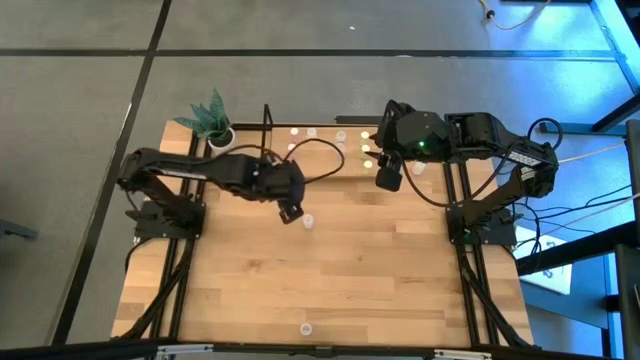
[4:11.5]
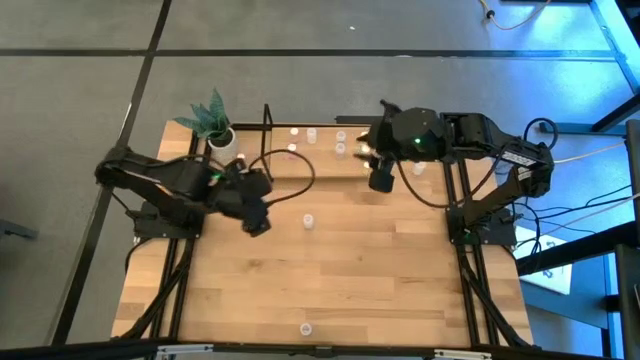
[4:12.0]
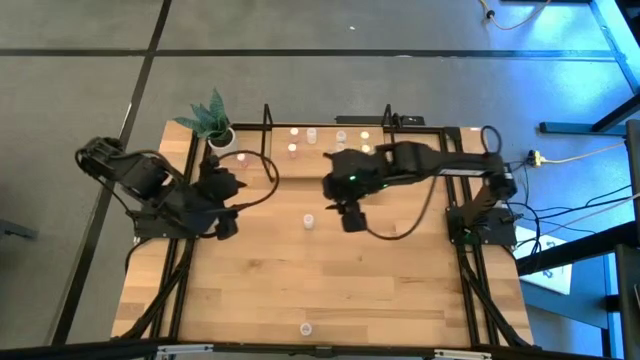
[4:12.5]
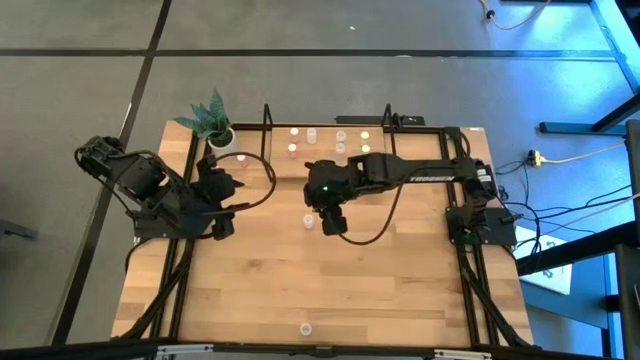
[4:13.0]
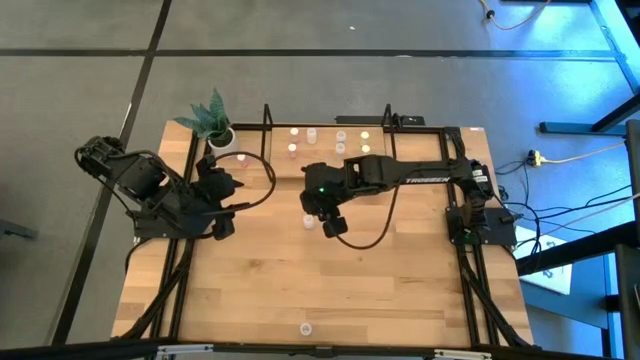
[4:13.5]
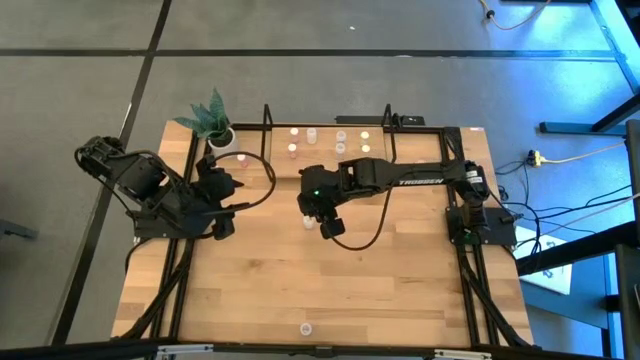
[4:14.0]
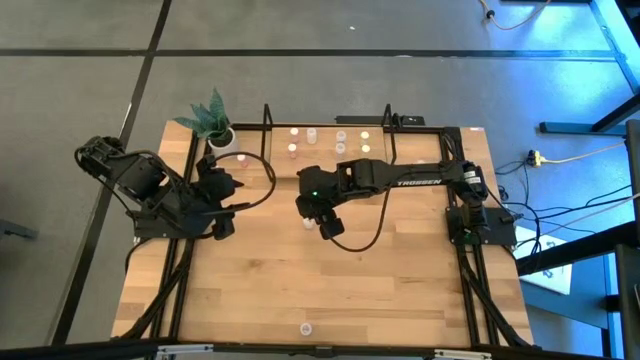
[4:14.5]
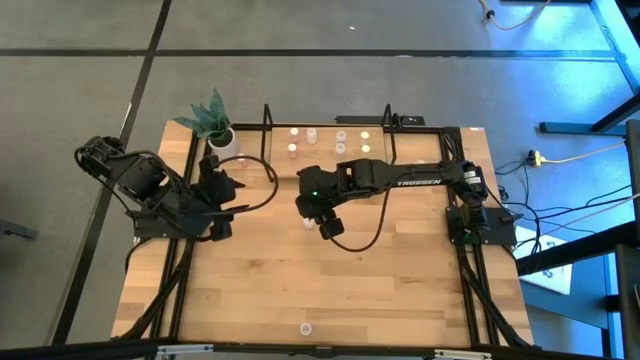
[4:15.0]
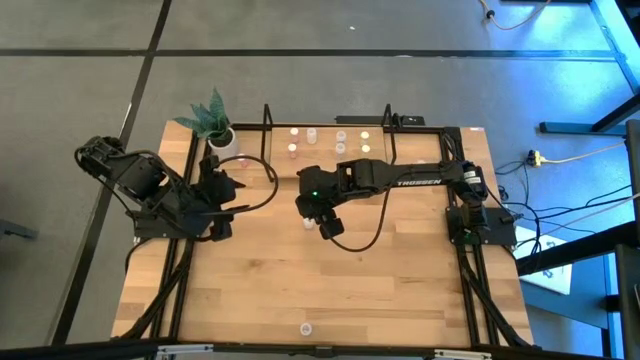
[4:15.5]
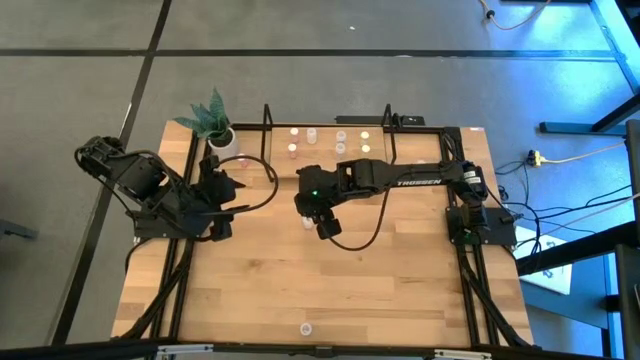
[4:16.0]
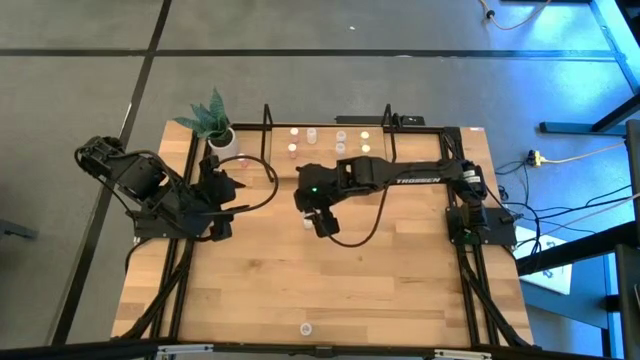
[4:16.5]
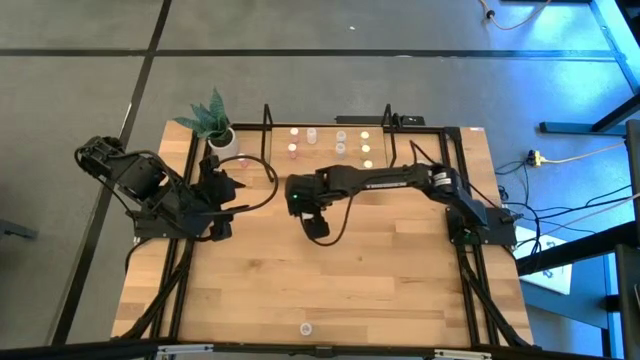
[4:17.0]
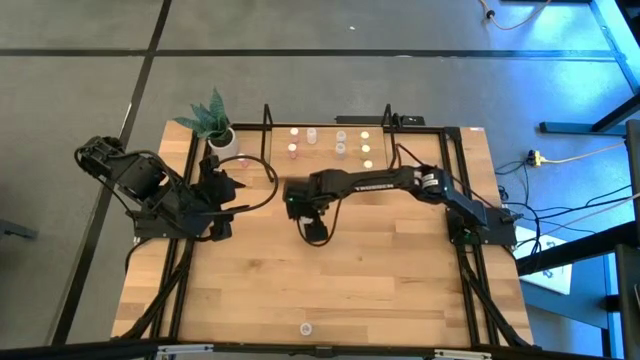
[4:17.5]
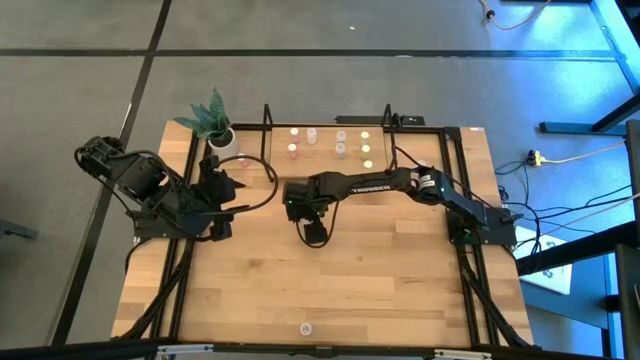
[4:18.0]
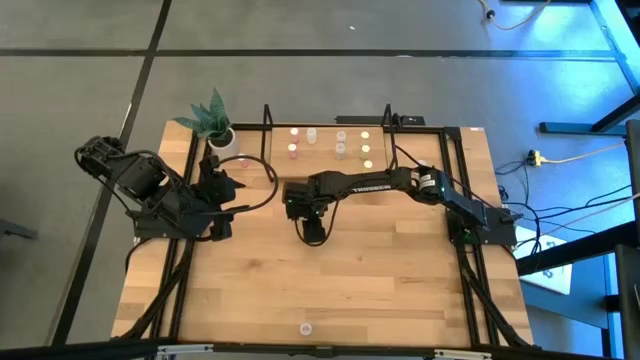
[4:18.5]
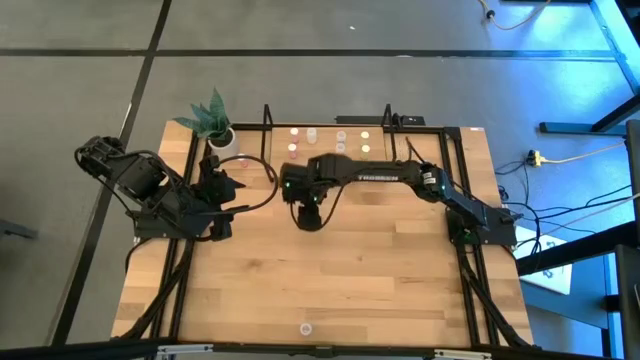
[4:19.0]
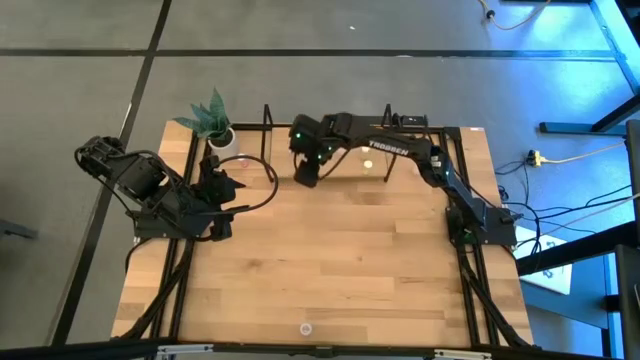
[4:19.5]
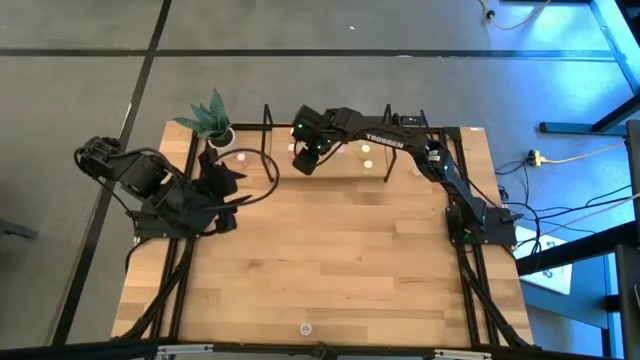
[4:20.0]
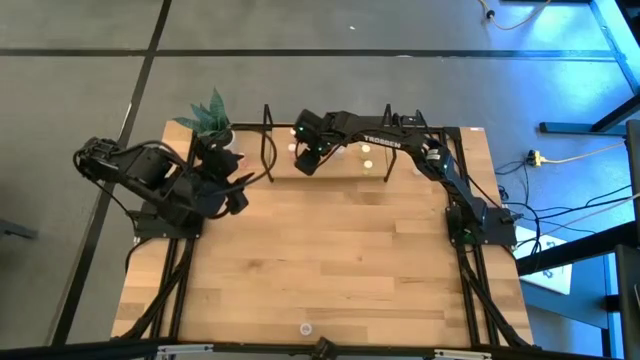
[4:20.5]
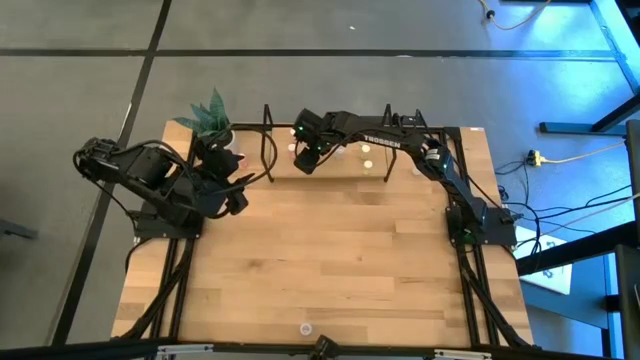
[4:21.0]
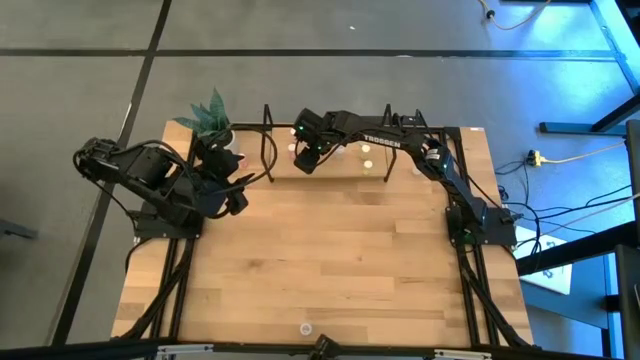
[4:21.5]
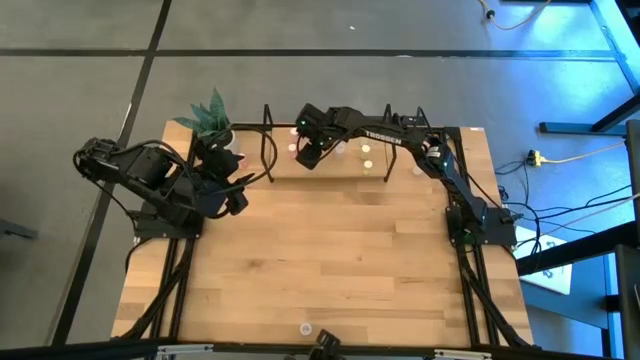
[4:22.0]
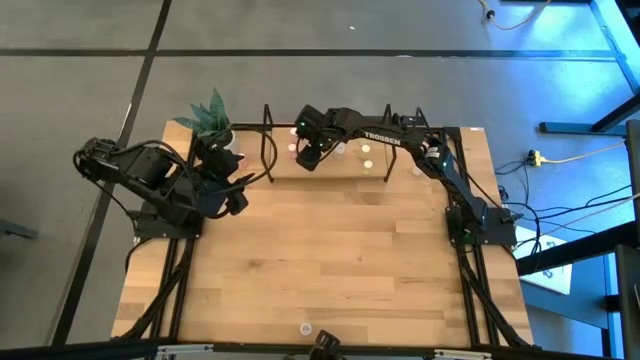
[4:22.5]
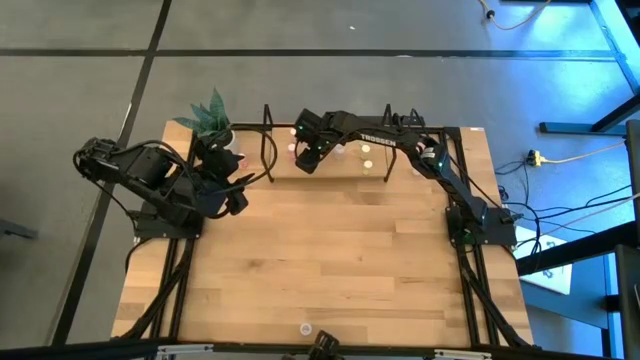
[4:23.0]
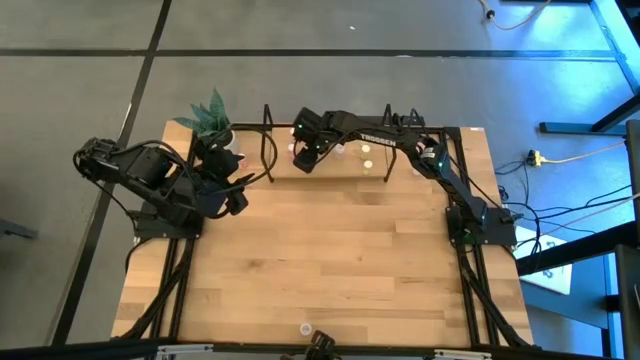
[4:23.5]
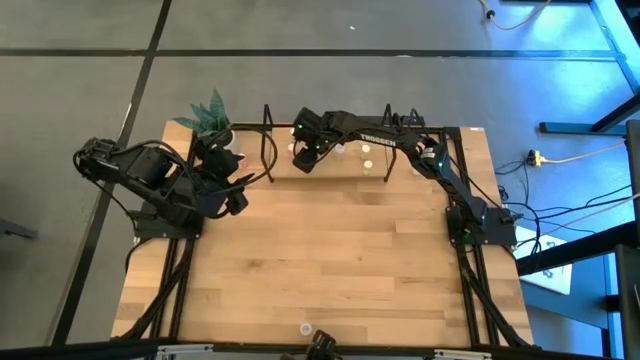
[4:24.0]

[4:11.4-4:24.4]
Task: Pick and place medicine bottles onto shelf by color
Put the bottom white pill bottle on the shelf aligned with the other white pill bottle

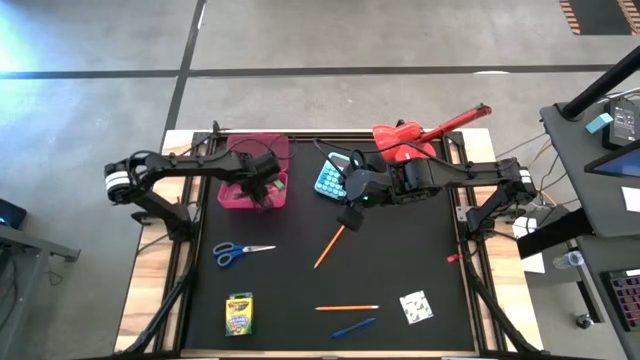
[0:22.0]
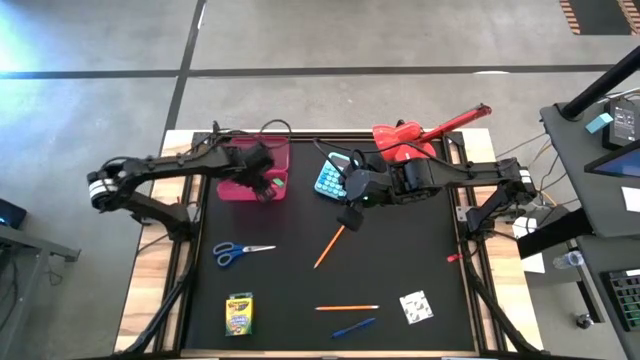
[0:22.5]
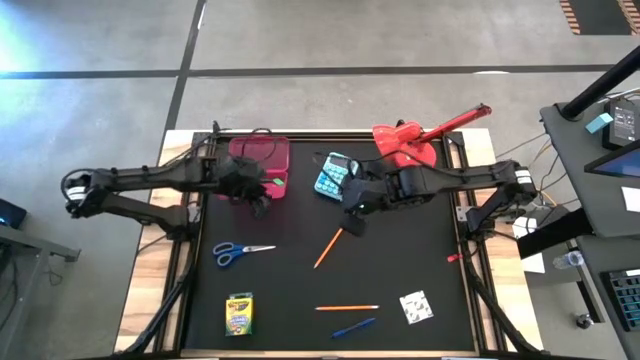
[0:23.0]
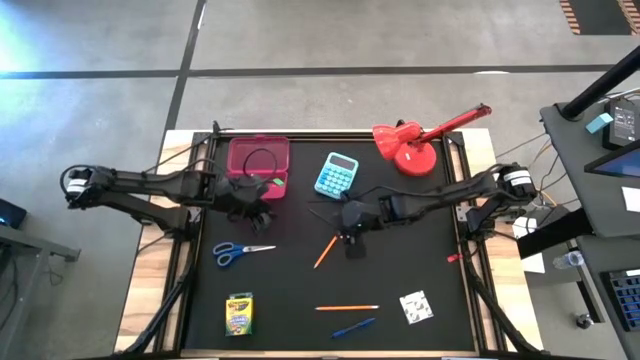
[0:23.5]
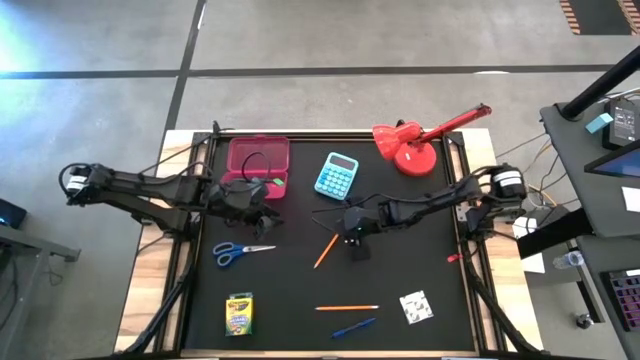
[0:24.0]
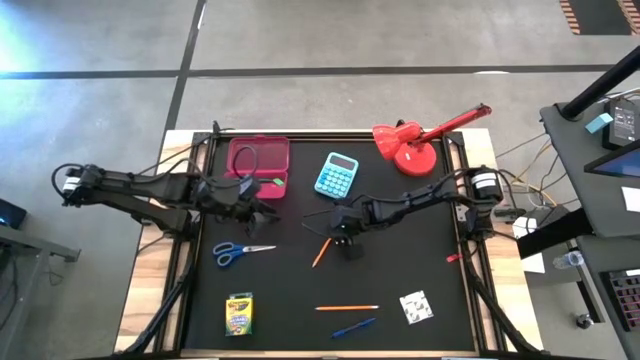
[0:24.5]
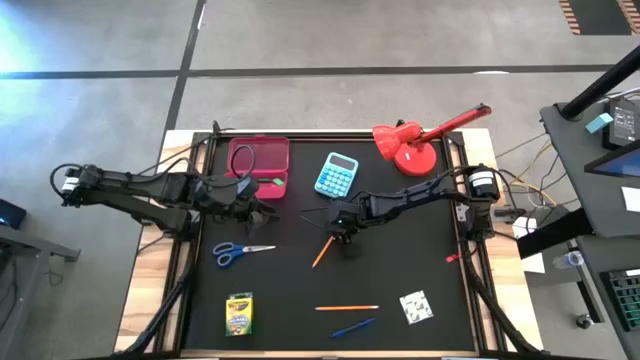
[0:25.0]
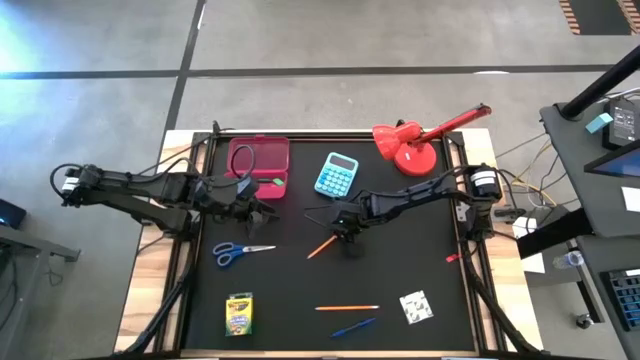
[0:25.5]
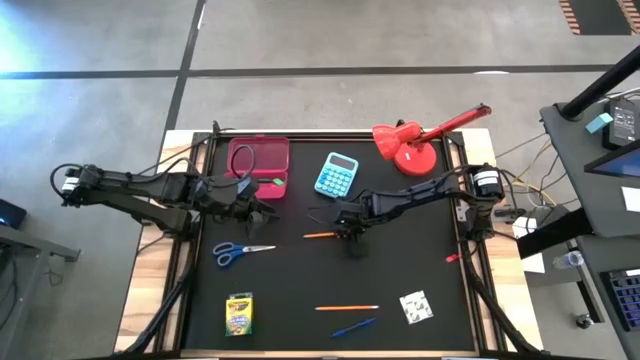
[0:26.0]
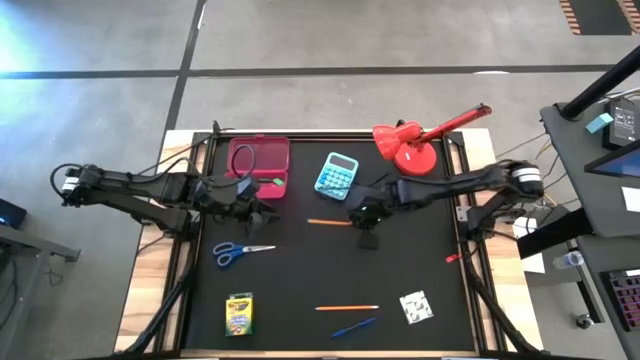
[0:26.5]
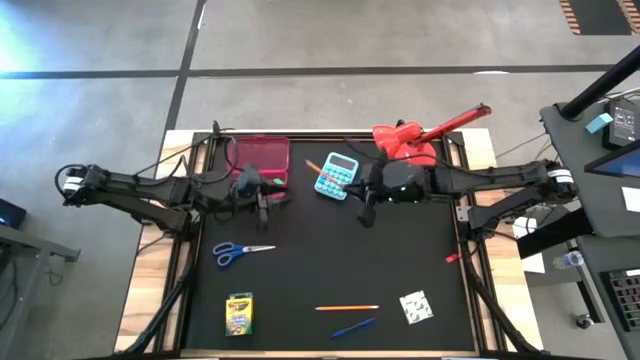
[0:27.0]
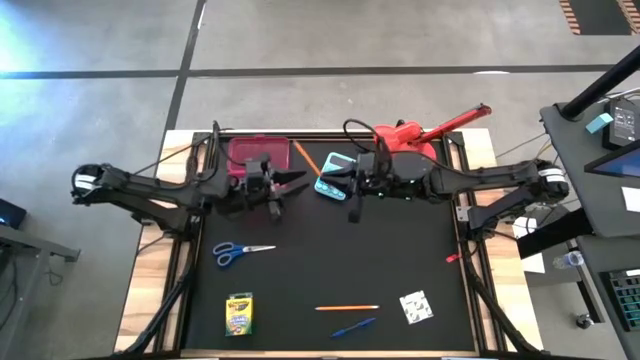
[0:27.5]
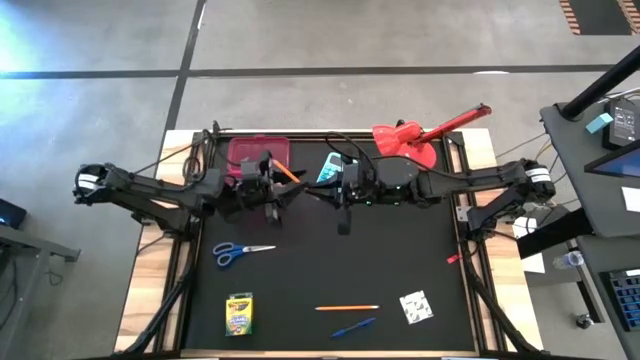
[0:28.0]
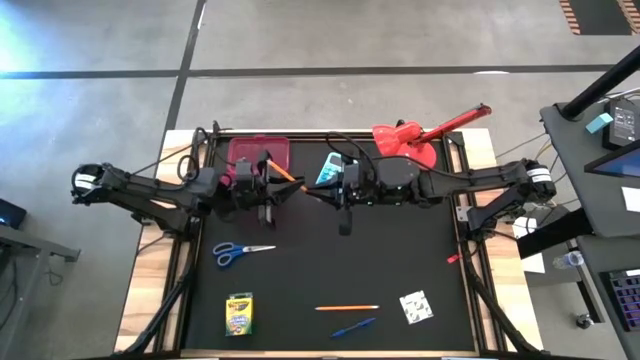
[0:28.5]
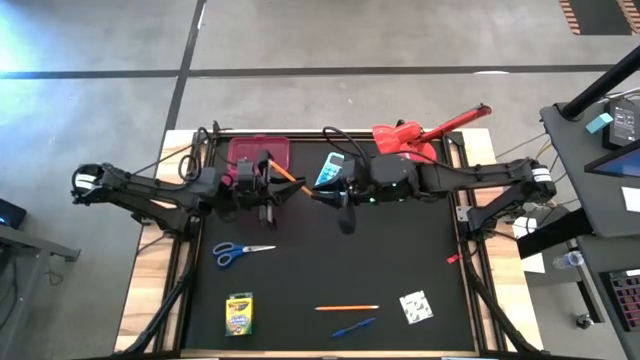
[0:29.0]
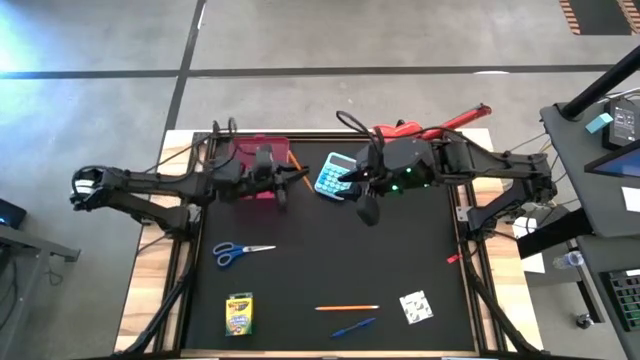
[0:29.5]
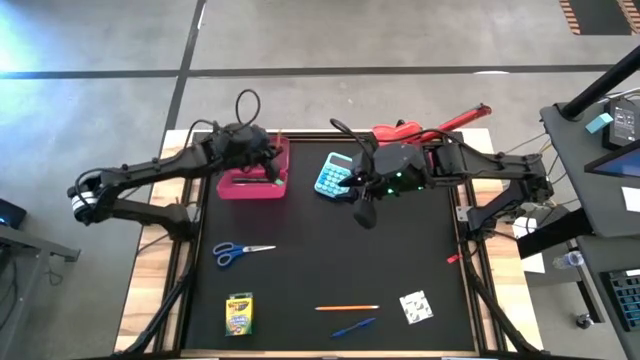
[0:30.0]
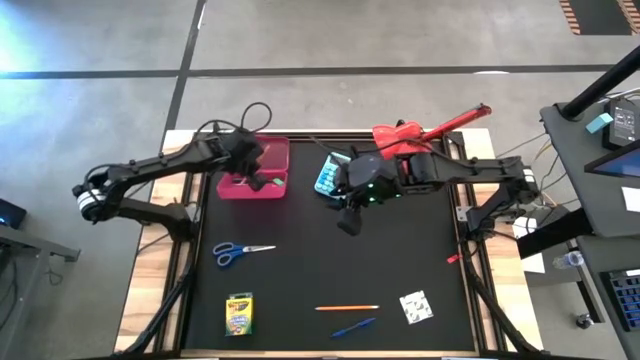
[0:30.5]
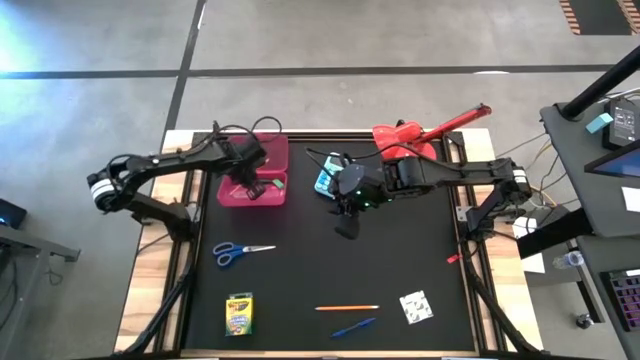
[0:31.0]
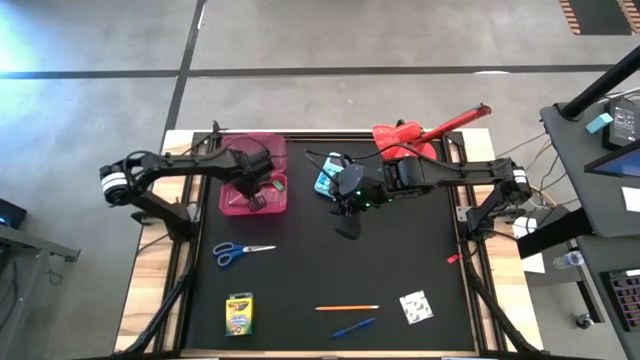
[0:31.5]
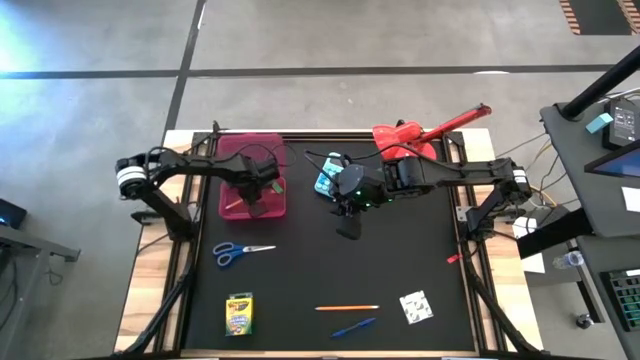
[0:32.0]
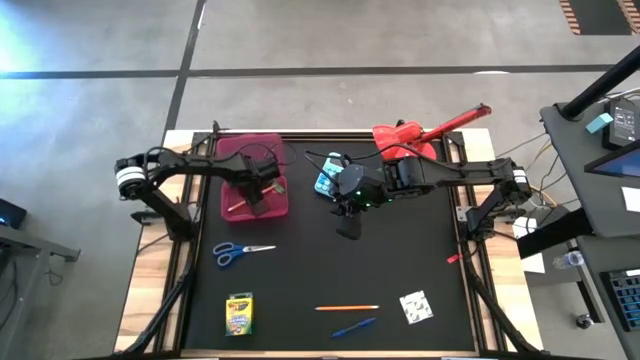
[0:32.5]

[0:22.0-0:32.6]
Task: Pack school essentials
Put the orange pencil into the red supply box
